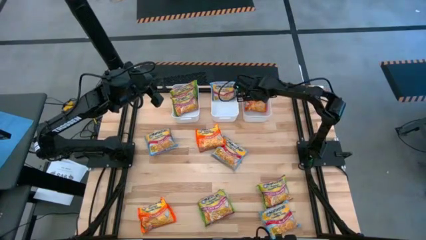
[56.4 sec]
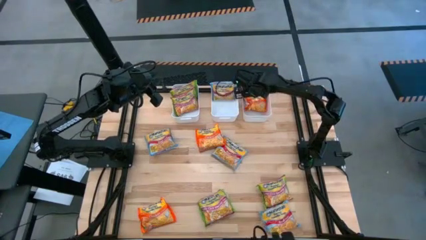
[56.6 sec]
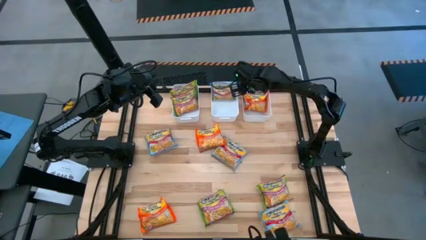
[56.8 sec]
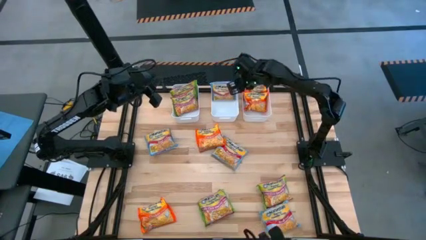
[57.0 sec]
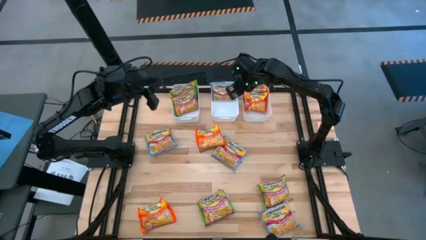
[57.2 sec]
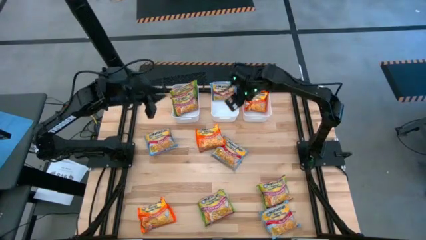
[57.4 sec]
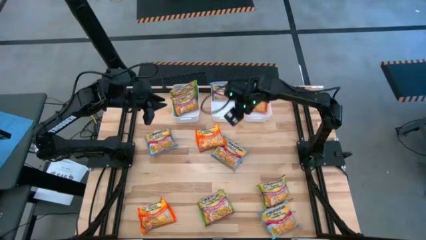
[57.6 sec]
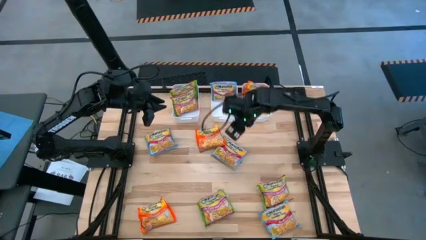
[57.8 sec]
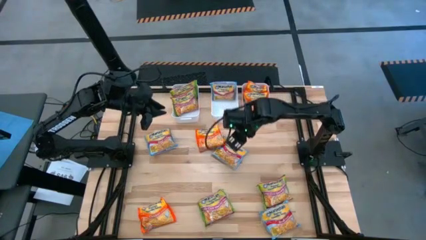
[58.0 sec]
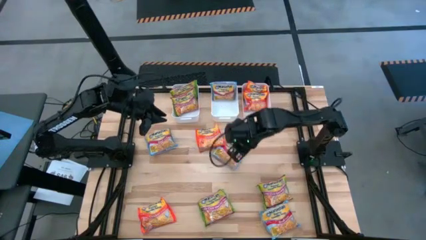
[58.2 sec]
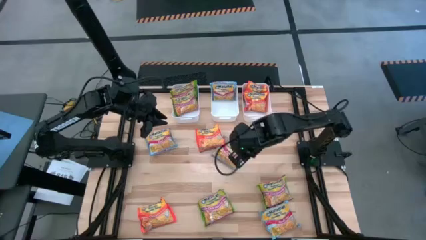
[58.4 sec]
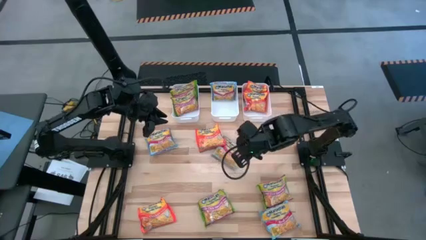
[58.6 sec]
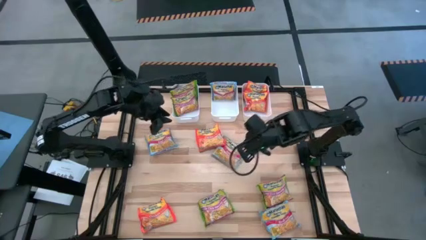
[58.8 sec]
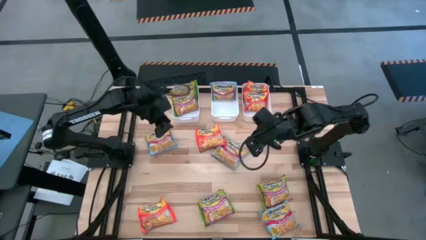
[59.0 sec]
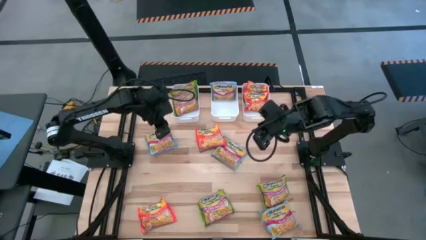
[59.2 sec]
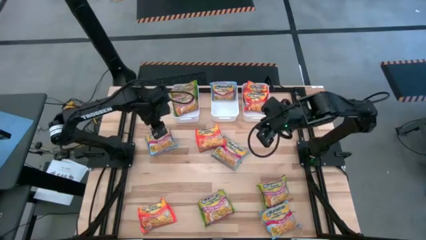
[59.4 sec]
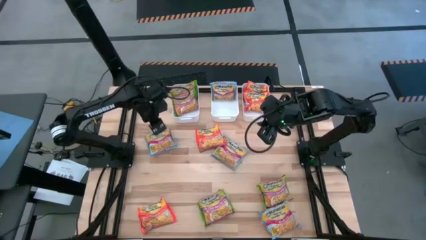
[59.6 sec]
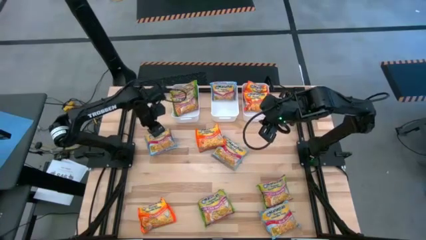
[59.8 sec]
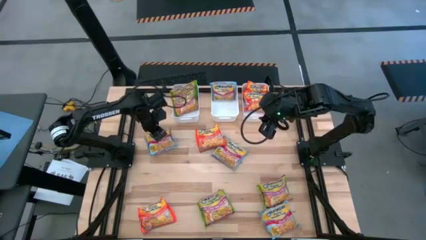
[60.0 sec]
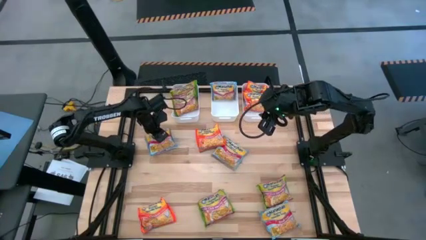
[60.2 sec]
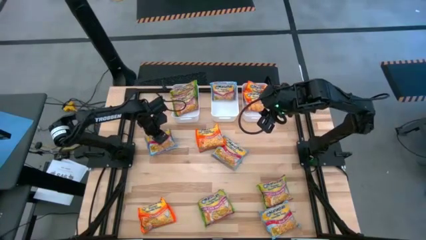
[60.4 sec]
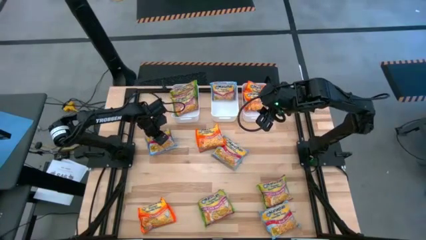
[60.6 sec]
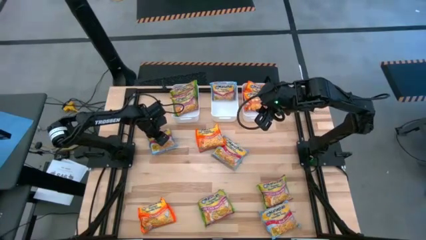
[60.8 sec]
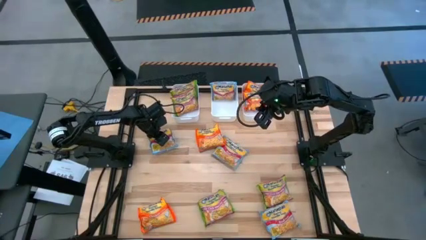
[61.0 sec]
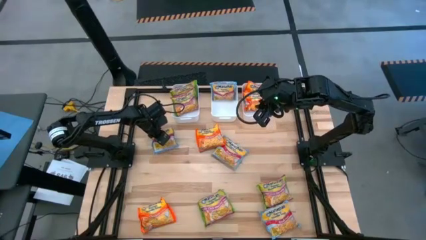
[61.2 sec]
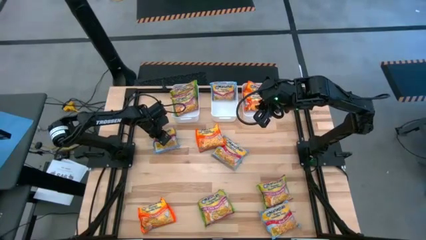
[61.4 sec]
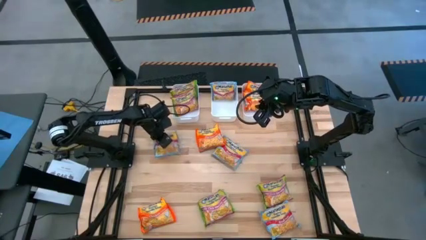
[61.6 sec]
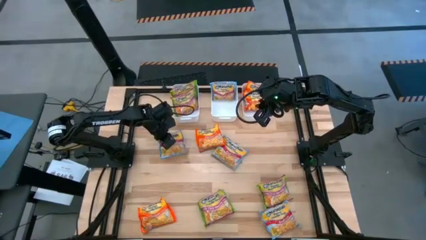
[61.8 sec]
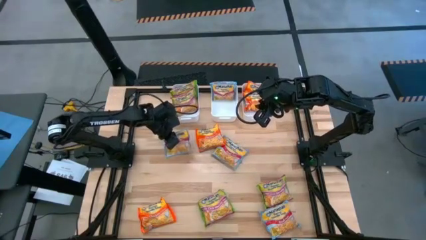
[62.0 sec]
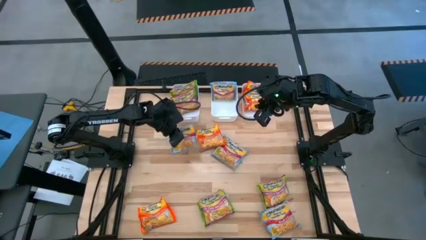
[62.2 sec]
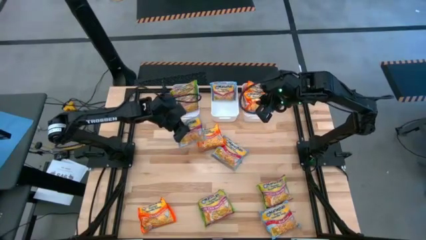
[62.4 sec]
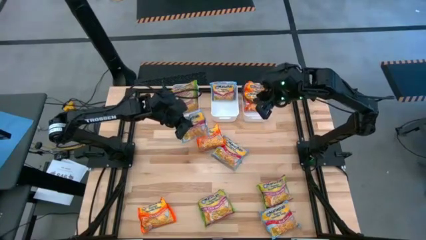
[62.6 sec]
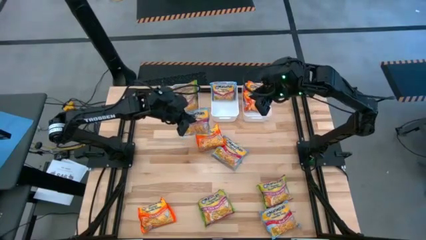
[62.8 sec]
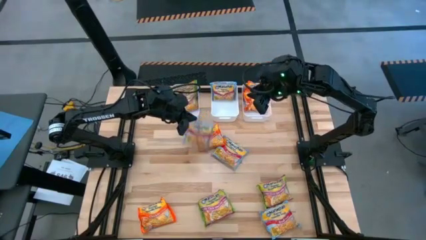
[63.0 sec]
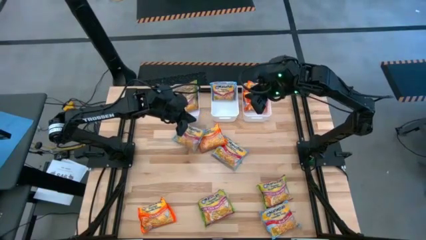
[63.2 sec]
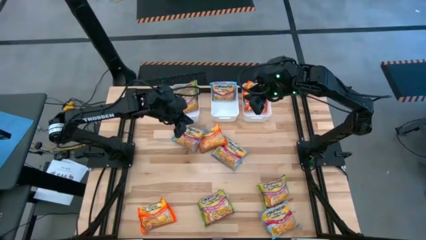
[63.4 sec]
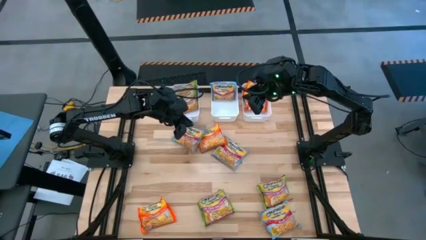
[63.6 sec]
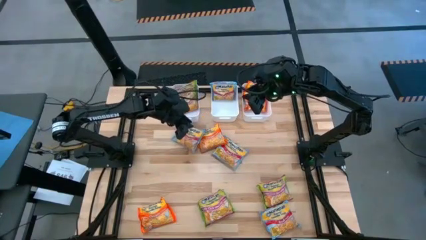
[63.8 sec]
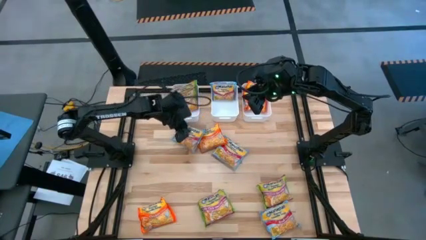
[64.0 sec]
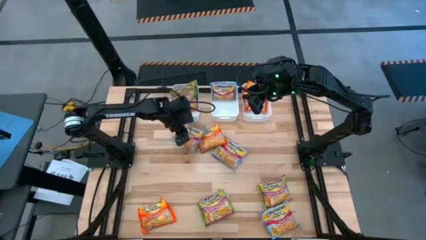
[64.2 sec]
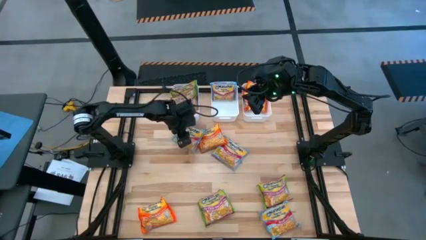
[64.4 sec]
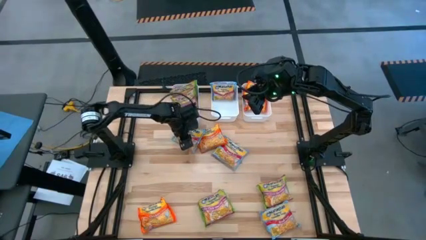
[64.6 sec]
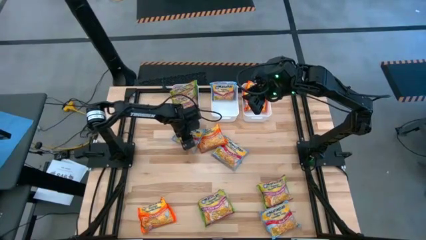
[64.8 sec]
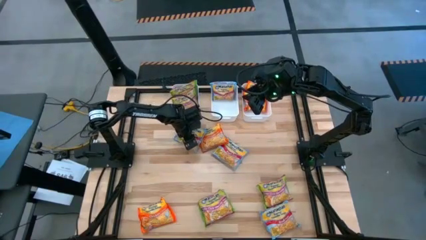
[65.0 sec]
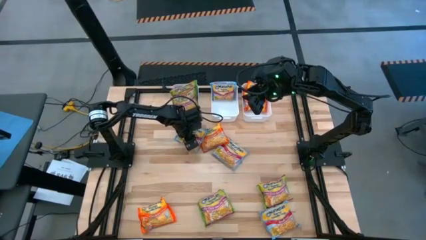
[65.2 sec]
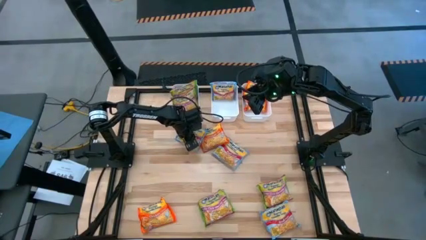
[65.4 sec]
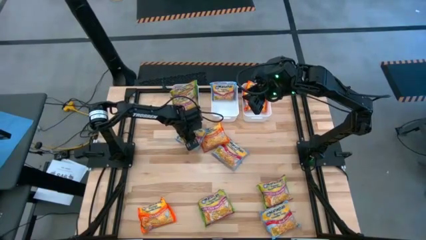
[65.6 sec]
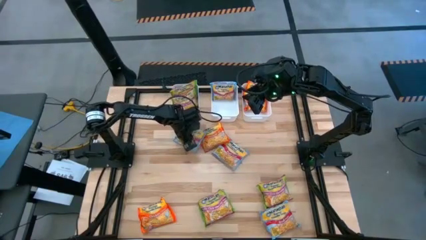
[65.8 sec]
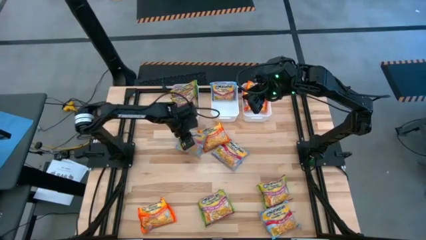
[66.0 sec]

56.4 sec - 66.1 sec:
Task: Sort Maruchan noodles
Put the blue noodle pack into the middle white bin

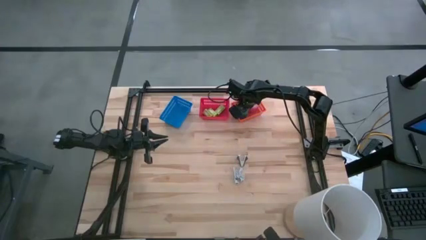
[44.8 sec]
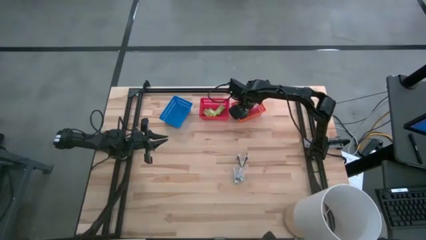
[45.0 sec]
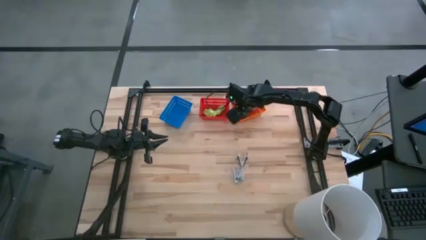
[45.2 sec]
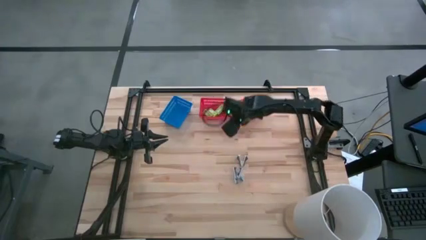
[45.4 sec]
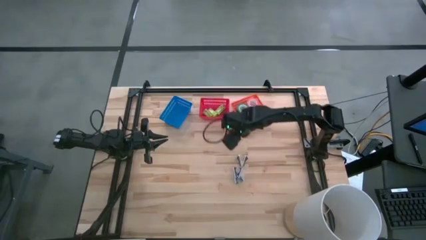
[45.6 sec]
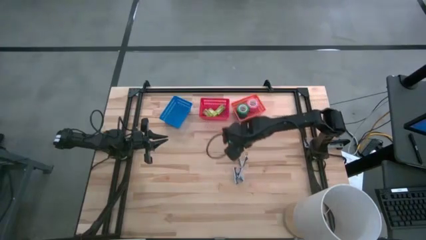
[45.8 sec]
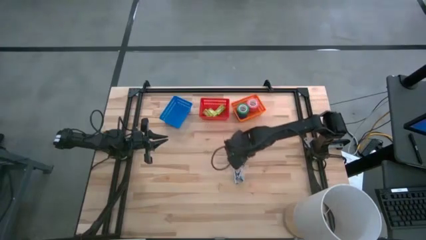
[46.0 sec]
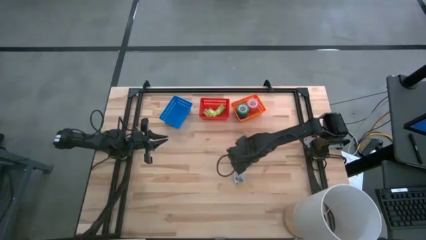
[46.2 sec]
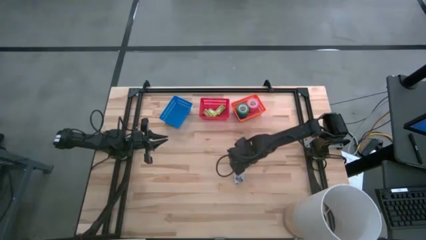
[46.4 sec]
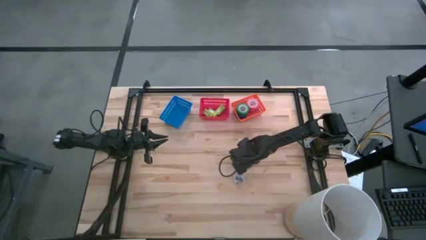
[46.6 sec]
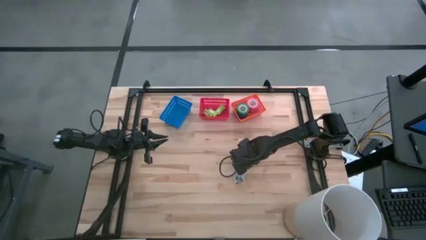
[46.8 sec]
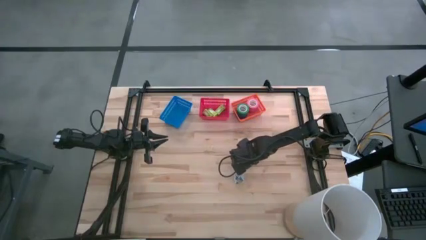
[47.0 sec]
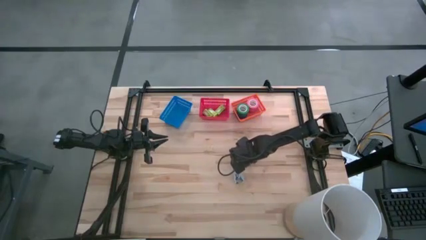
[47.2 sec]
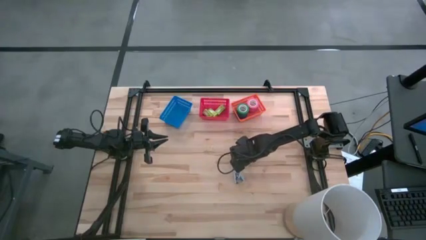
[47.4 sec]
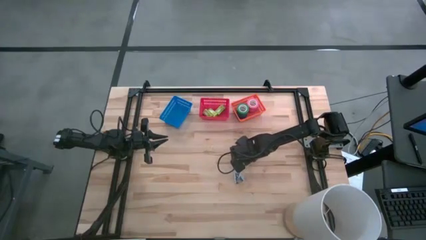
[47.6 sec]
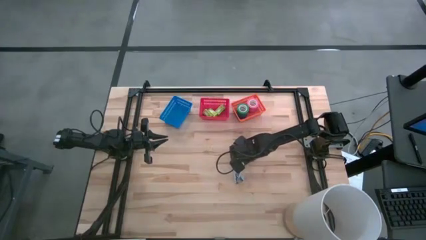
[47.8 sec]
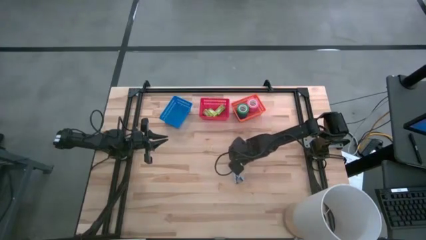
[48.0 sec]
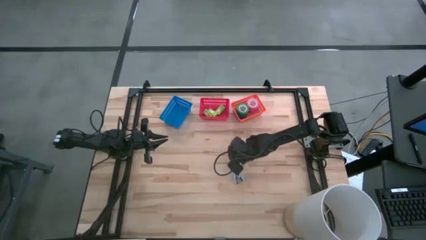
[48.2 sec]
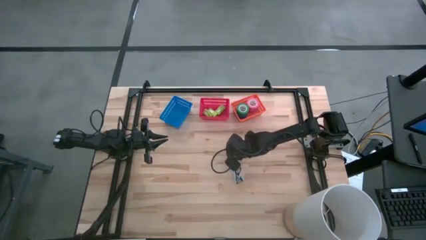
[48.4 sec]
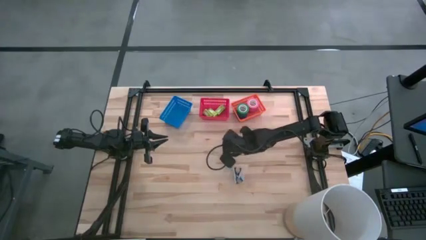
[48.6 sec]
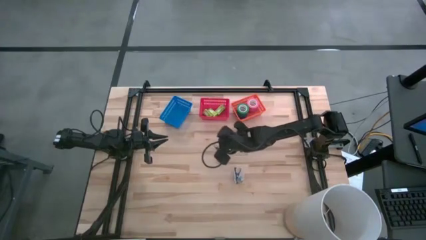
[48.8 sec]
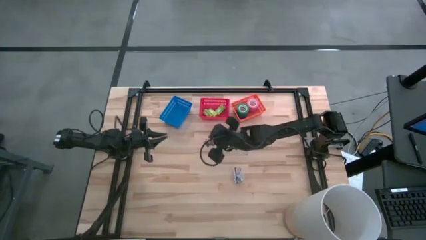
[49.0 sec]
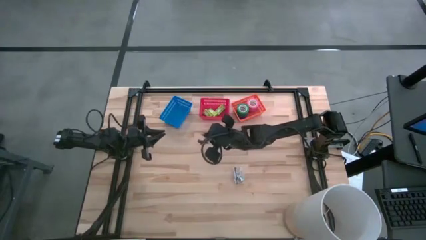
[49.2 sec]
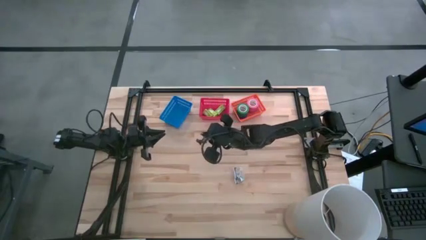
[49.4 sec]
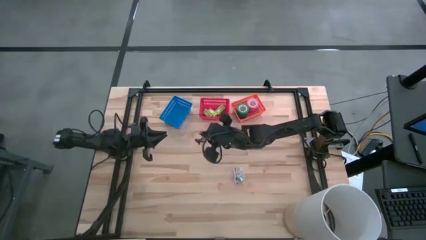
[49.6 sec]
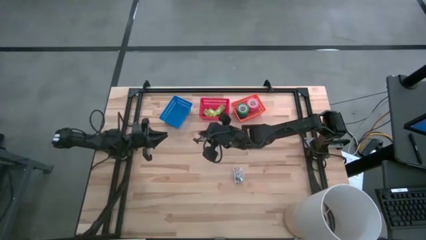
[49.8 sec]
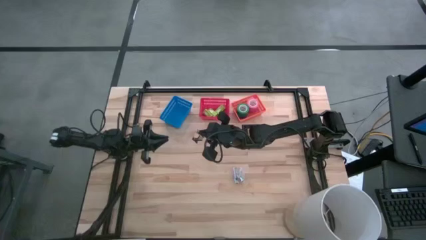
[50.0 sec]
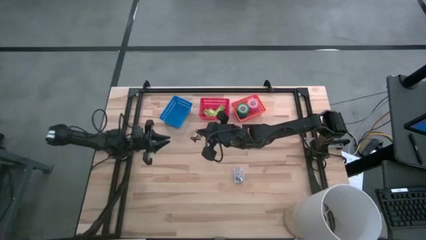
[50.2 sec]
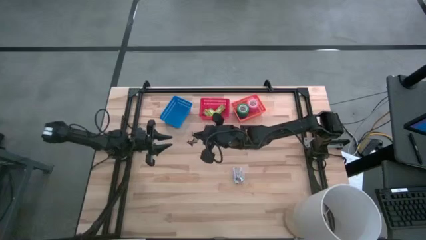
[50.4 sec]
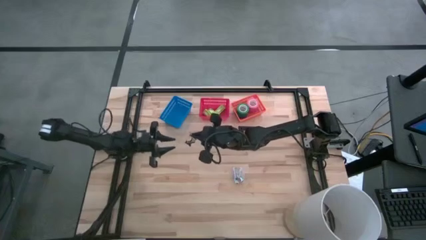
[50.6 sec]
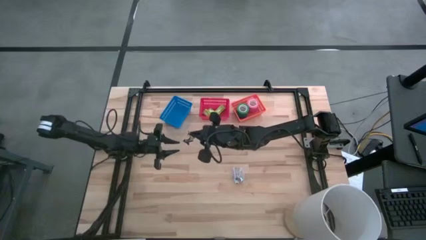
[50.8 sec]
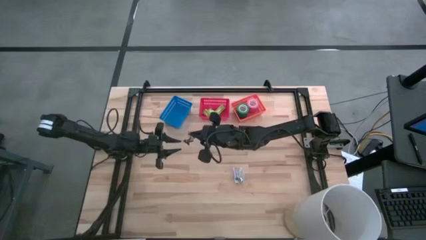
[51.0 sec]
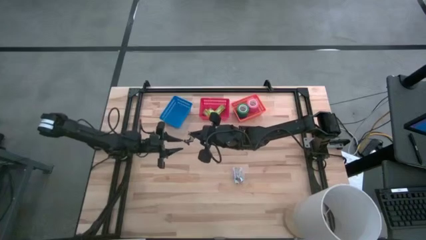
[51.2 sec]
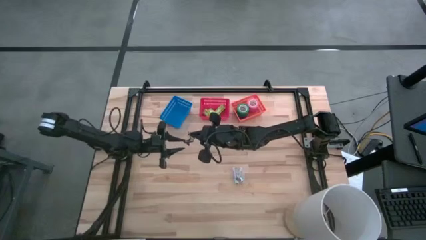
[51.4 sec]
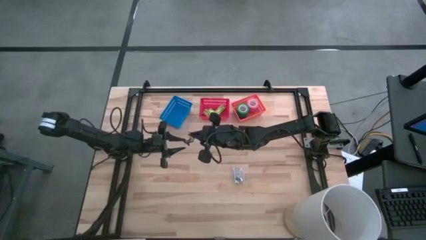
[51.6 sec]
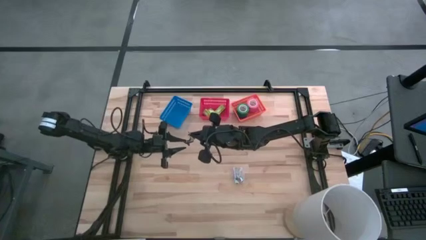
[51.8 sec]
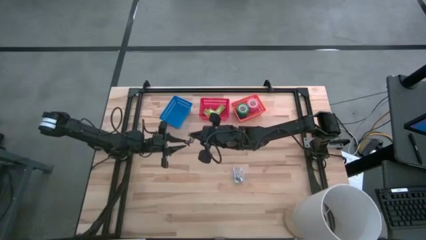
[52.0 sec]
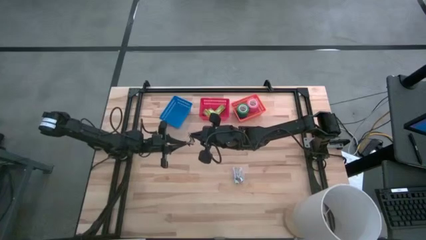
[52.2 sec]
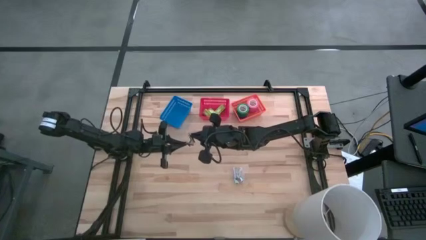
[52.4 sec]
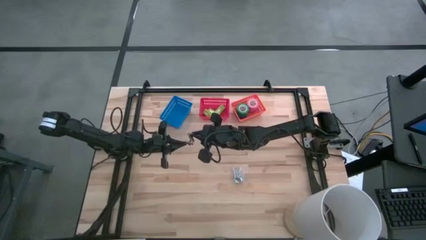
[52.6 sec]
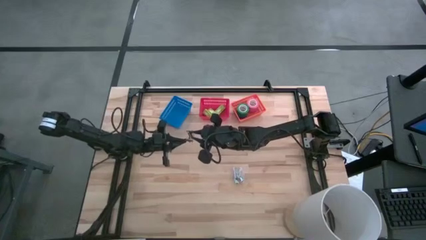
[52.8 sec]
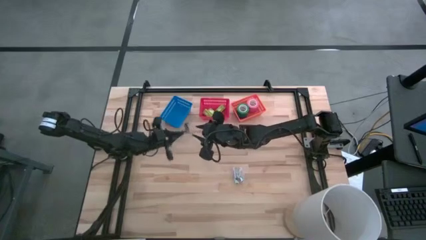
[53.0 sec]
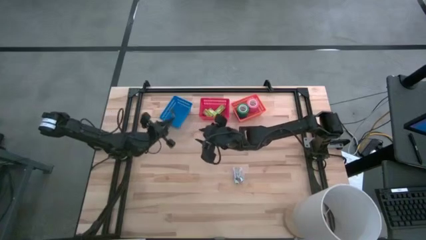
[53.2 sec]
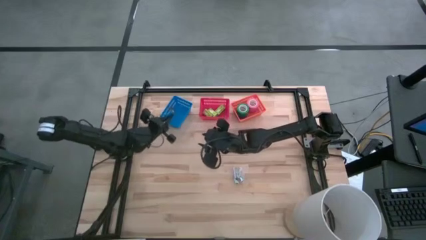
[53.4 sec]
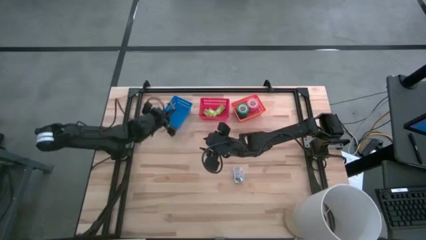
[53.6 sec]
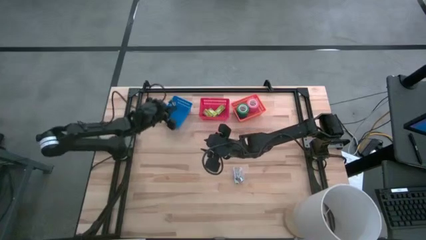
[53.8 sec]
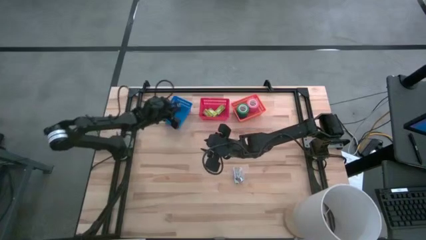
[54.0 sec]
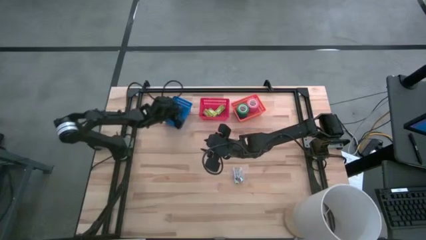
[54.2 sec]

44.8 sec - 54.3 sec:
Task: Pick and place Stapler, Stapler remover, tape
Put the black staple remover into the blue bin
